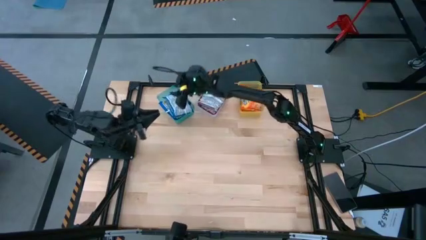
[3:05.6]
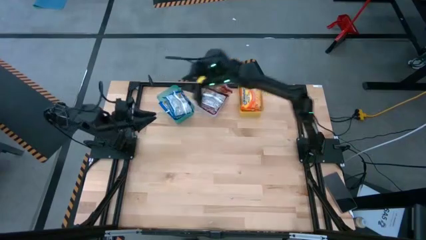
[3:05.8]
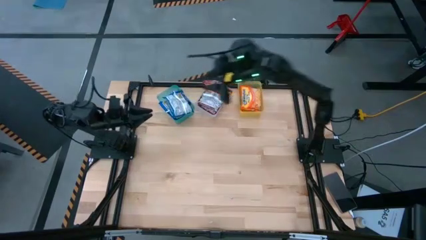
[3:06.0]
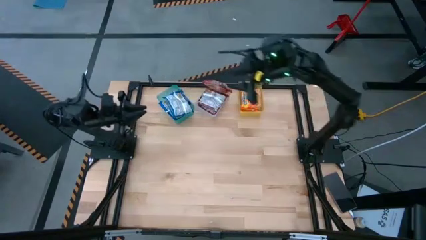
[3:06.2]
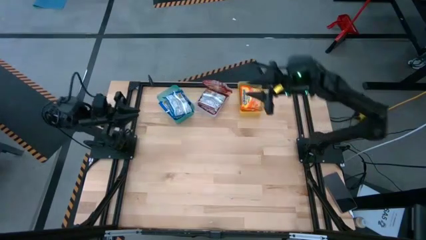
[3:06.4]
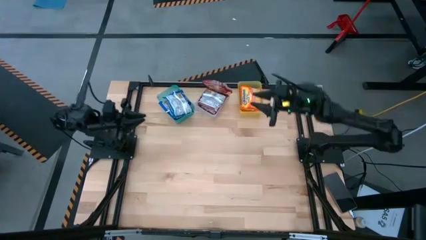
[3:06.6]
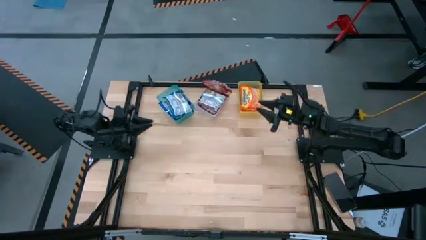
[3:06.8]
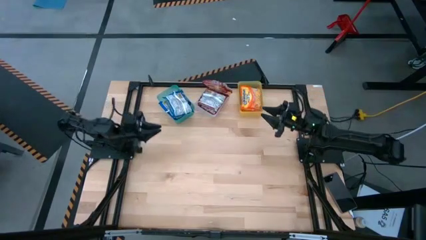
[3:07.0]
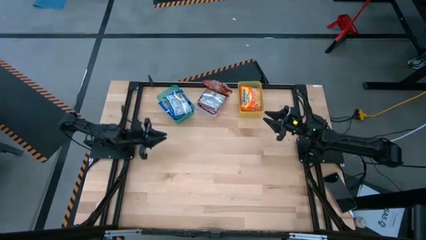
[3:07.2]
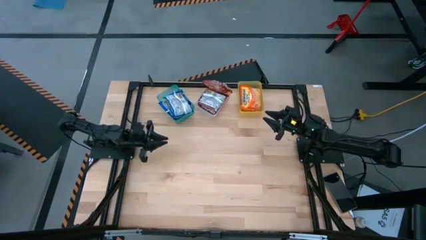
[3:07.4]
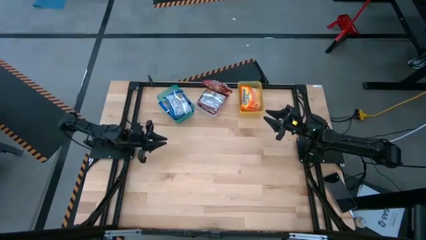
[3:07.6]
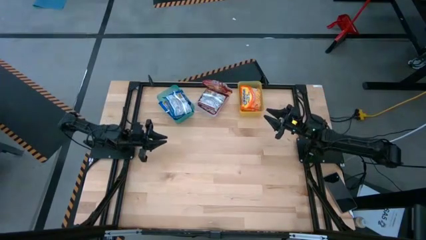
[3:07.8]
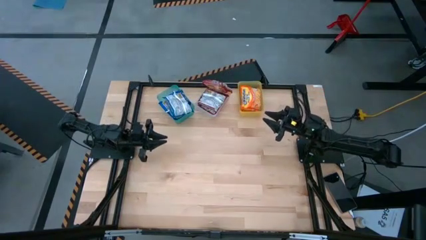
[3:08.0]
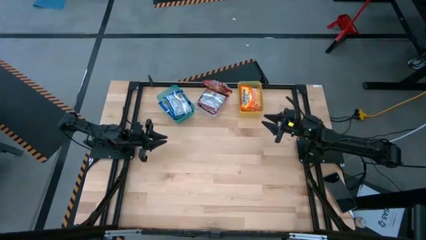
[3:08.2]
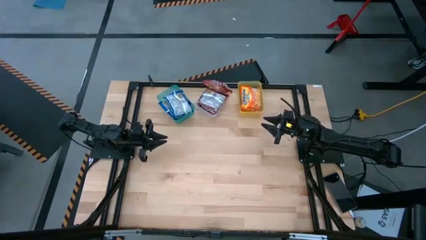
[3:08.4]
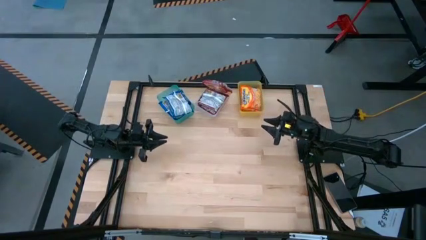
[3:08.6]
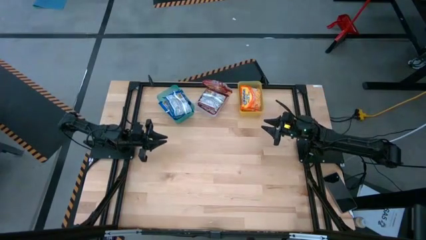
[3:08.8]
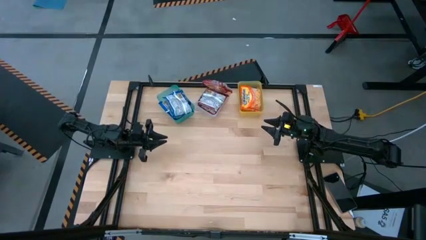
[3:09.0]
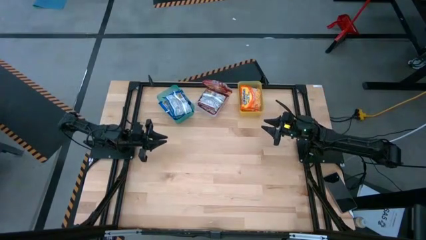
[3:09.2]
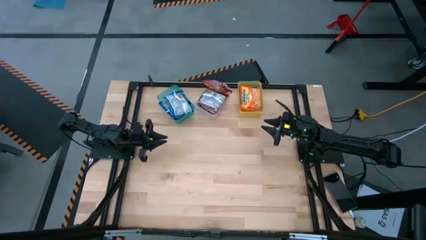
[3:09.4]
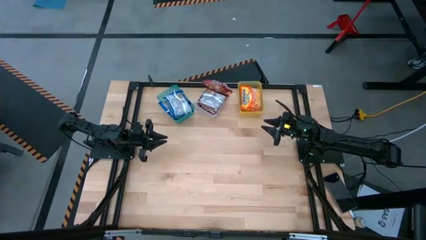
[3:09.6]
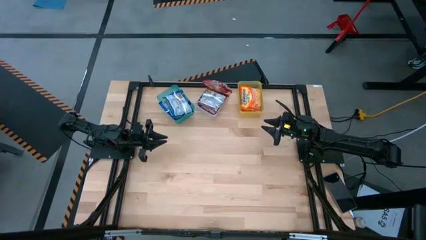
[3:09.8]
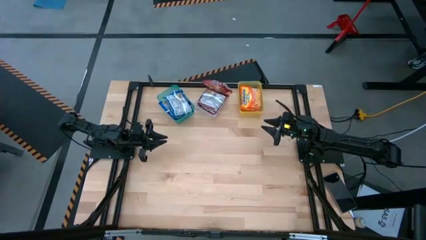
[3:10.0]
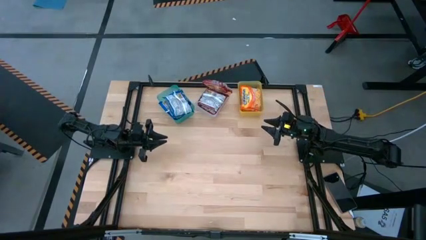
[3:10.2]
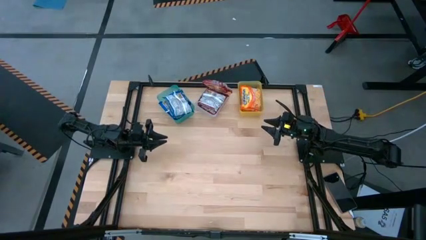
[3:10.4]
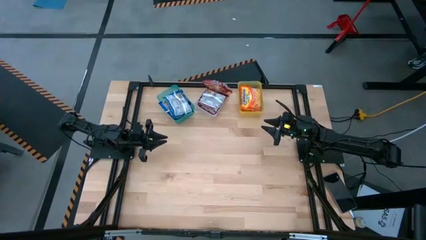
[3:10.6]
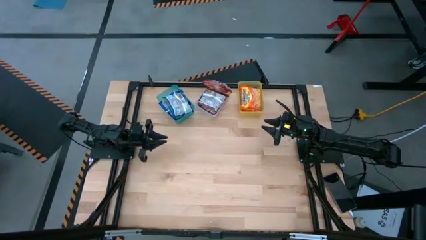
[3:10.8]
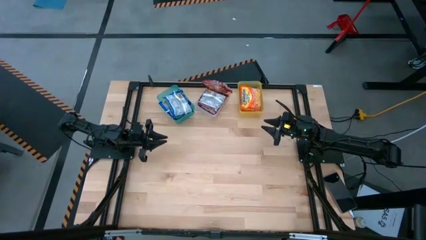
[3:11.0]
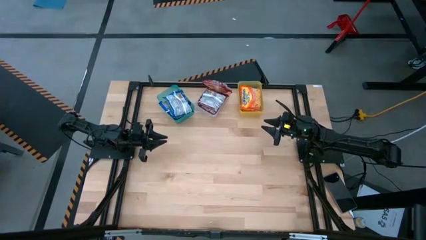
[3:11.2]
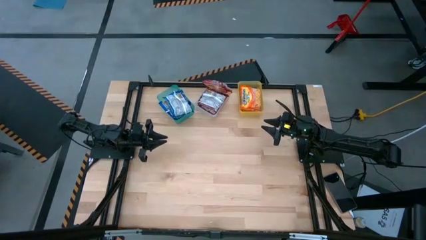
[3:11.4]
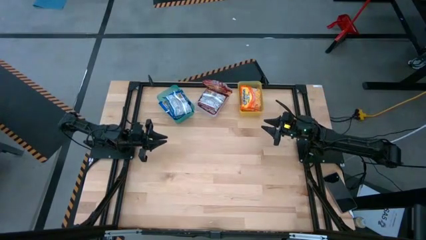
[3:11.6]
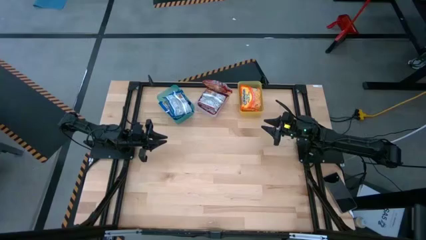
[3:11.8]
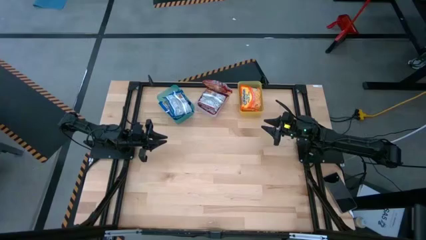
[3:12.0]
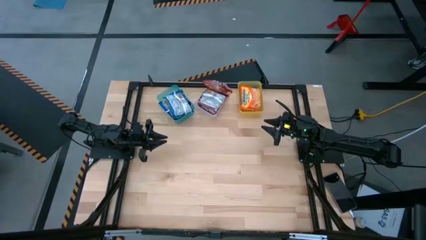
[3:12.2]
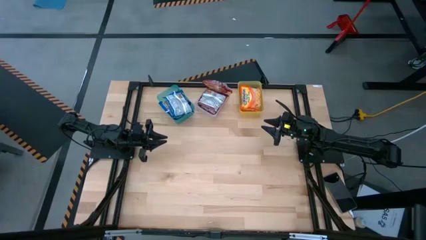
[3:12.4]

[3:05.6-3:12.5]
Task: Sort Maruchan noodles
Return to Home Position

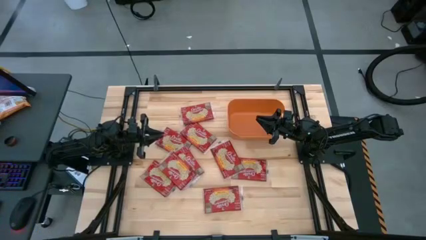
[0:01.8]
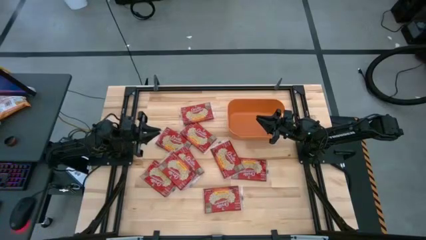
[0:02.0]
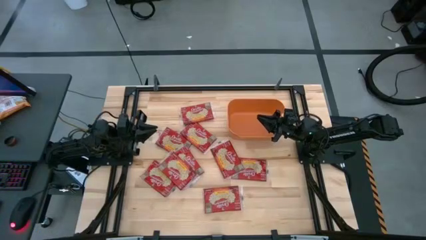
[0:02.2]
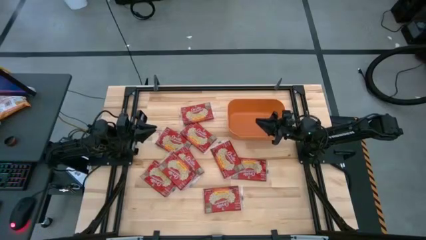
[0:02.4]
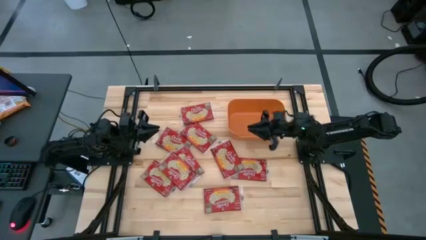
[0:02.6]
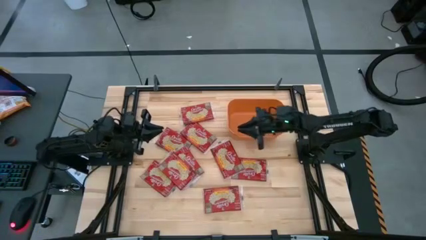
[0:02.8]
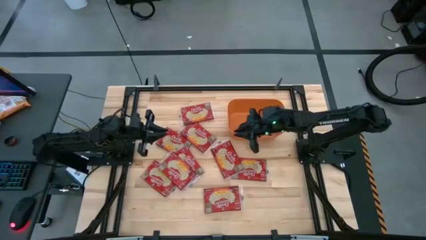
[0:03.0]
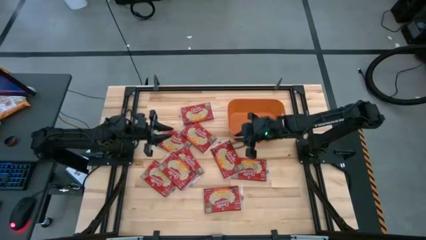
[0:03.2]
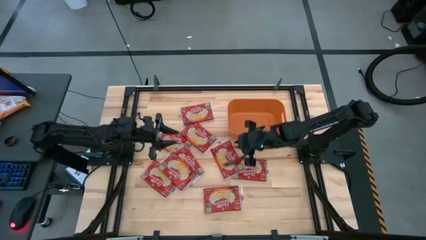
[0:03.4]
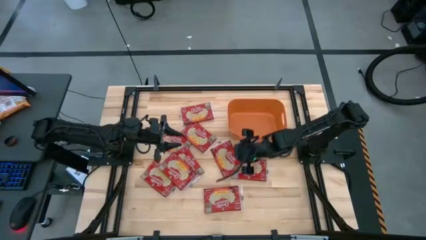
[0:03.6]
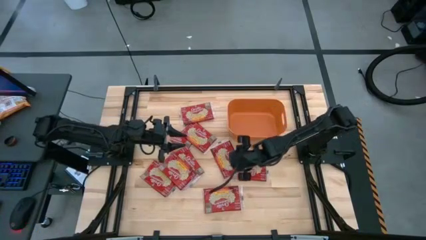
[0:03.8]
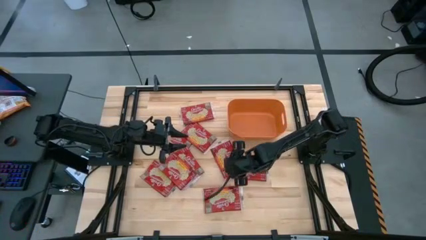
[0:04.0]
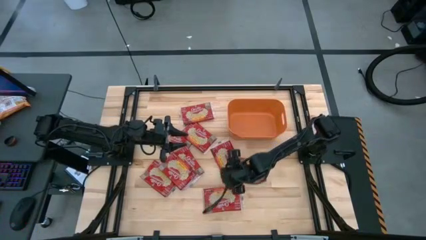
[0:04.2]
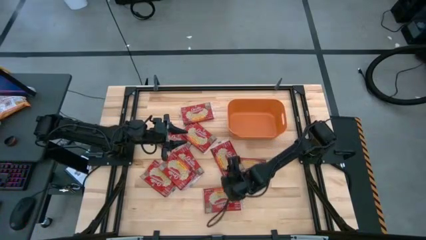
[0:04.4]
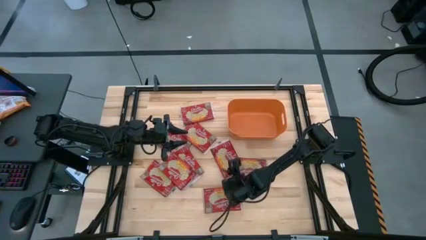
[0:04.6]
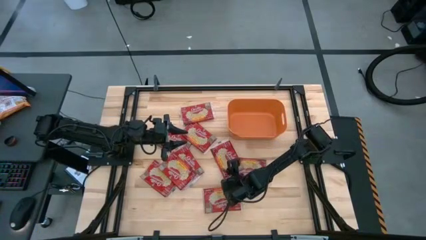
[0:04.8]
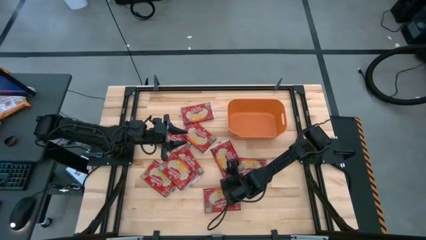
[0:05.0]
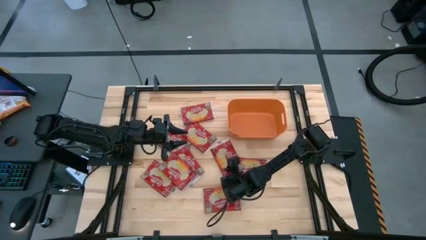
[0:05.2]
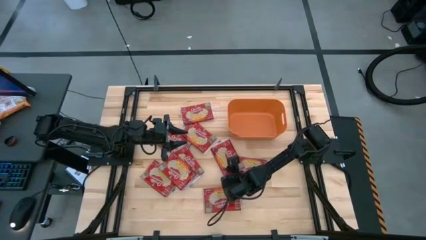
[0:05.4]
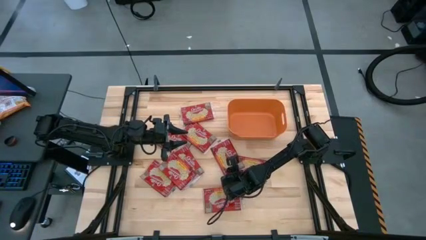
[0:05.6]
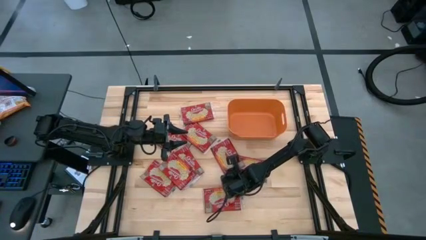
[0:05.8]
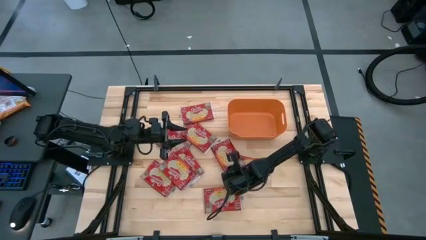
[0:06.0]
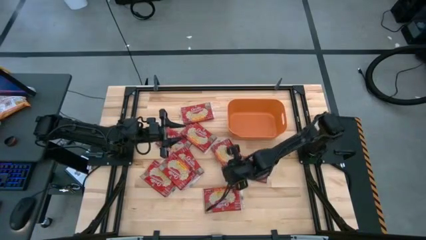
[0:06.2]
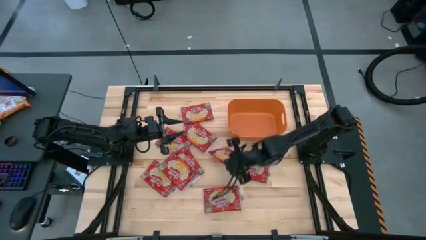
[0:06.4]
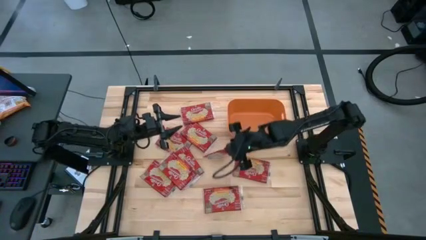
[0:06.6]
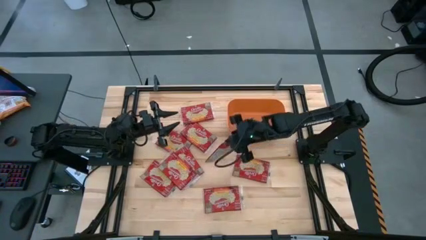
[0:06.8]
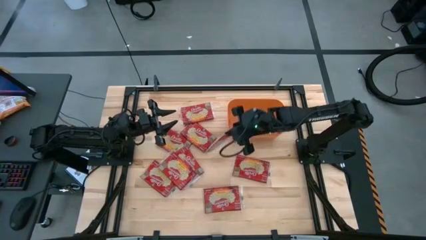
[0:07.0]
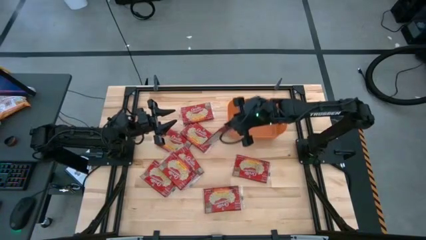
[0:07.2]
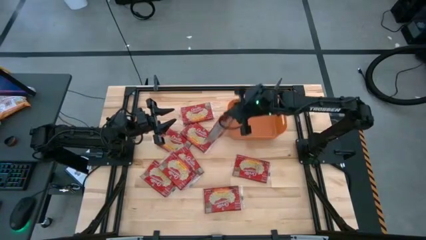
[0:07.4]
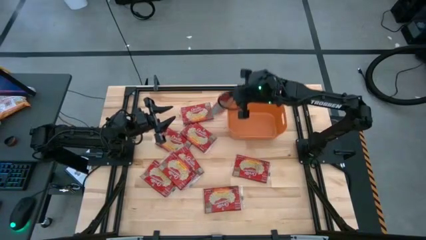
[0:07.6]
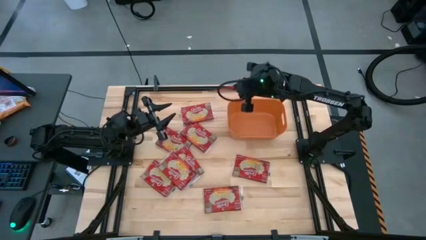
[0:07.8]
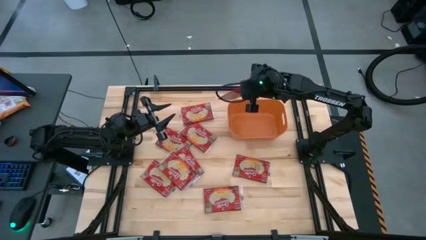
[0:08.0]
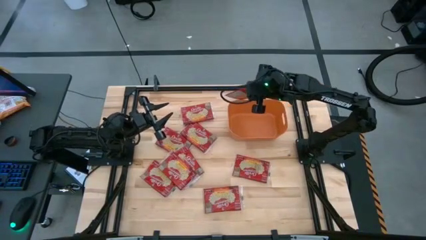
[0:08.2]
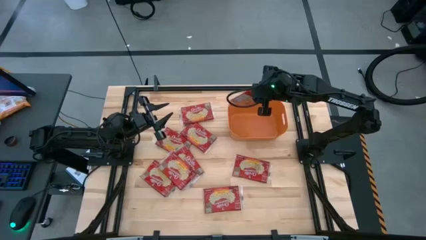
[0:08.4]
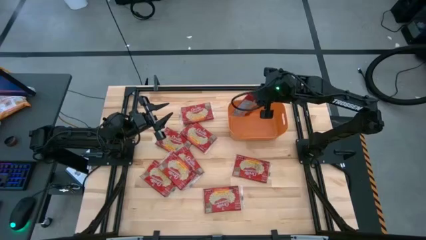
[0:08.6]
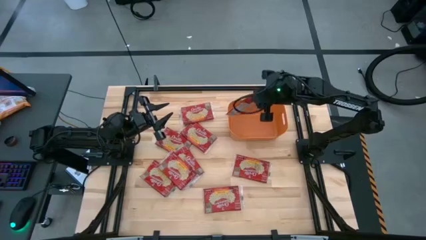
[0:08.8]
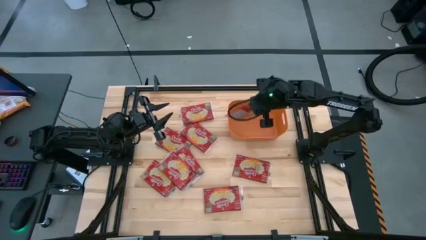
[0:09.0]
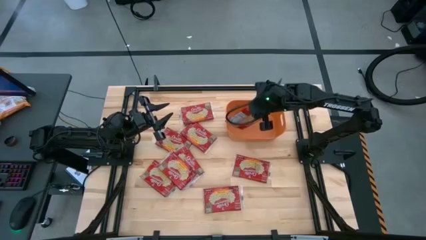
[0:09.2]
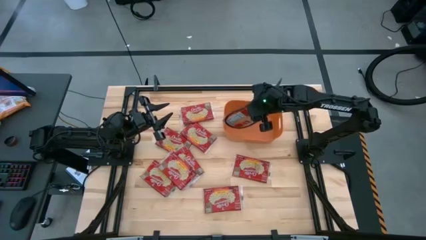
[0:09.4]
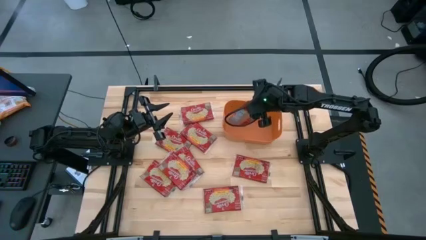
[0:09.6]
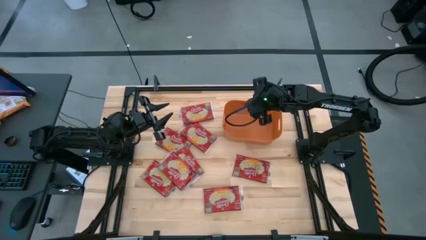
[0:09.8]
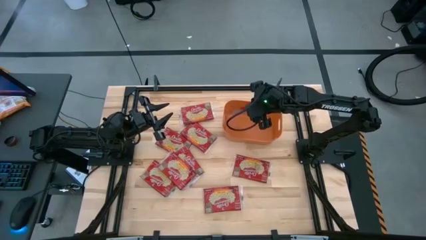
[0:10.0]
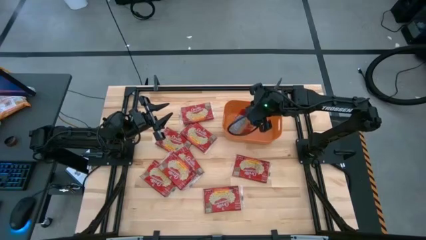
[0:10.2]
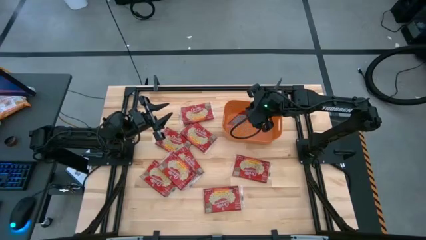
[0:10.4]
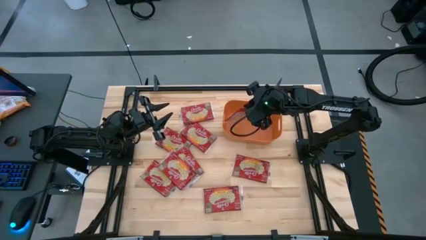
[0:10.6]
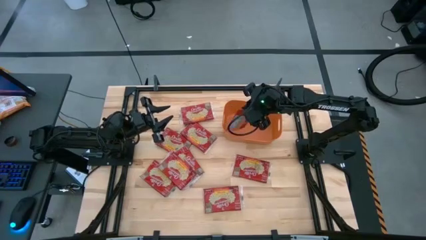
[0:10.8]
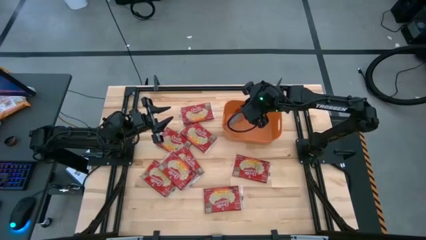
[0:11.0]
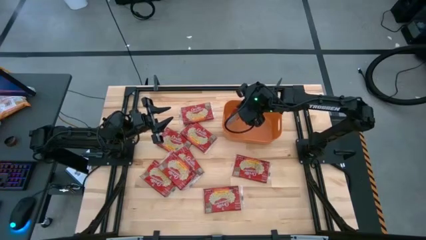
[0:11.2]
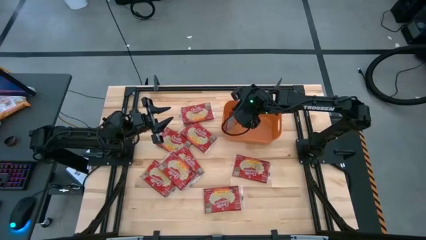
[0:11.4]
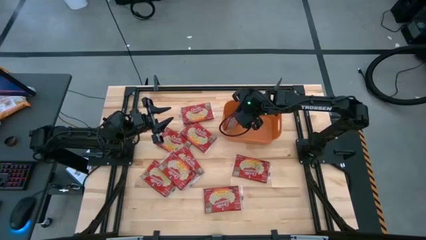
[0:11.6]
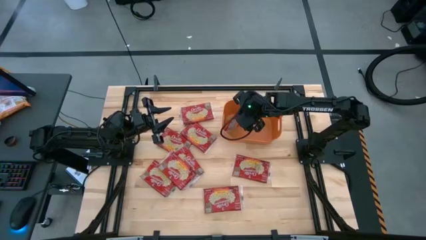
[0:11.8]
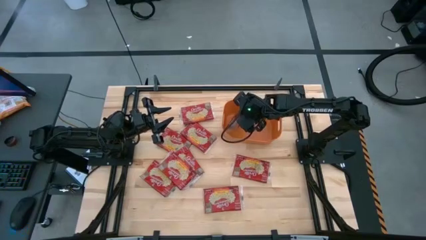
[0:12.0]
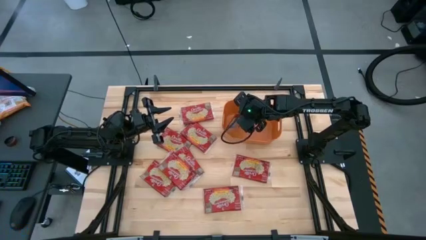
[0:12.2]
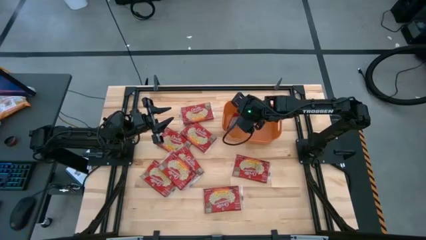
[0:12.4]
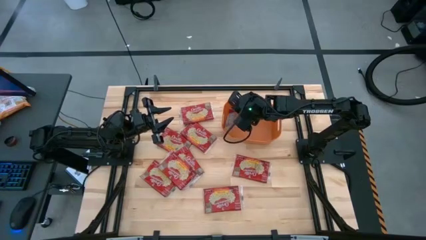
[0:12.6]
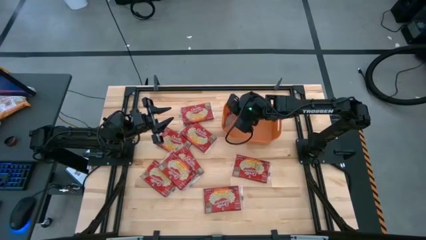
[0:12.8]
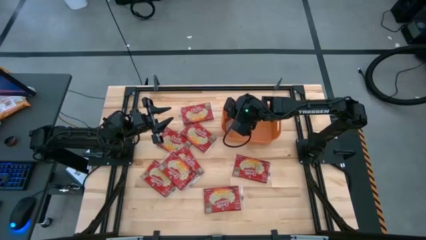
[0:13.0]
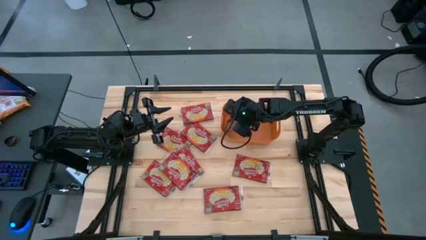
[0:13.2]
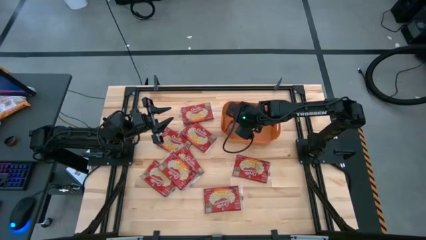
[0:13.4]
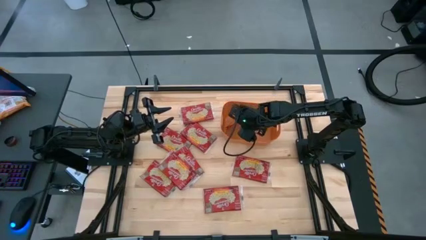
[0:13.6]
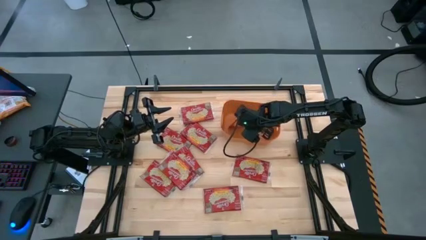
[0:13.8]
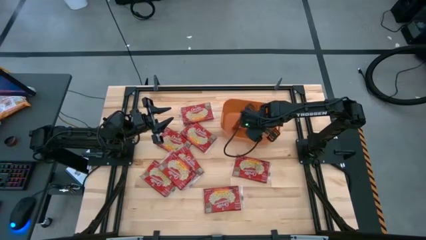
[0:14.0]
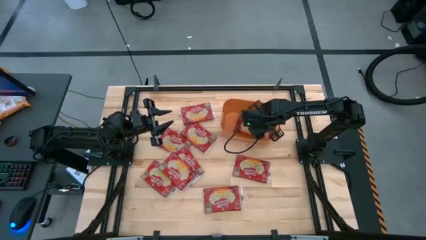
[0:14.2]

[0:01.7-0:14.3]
Task: Sort popcorn bags into baskets
Put the popcorn bag into the orange bin
